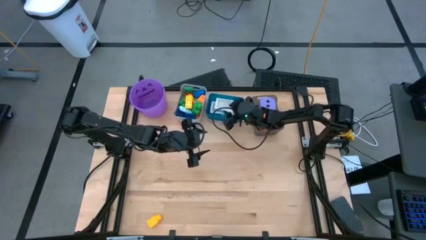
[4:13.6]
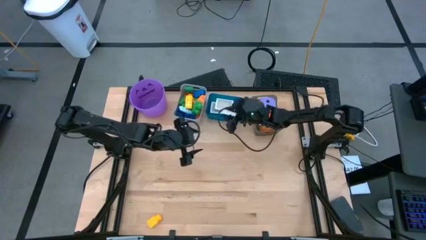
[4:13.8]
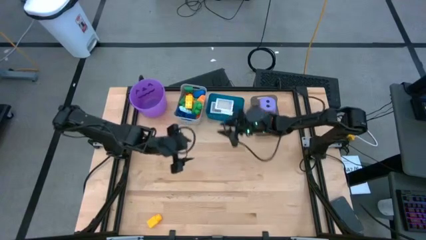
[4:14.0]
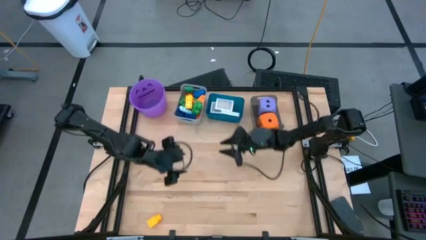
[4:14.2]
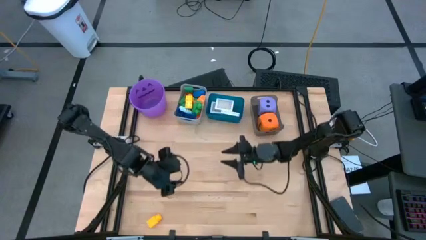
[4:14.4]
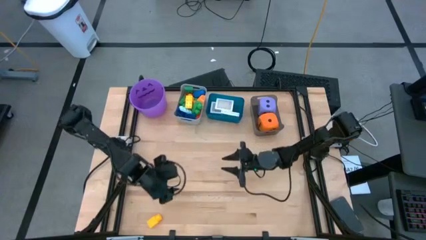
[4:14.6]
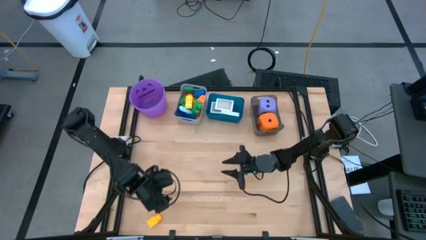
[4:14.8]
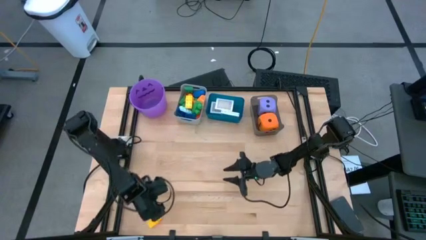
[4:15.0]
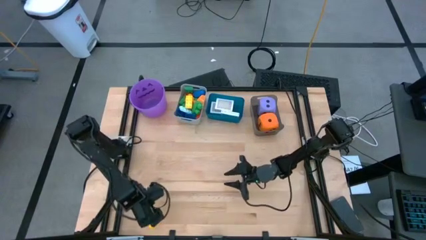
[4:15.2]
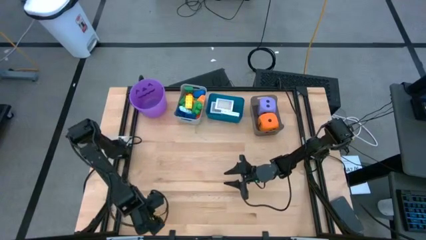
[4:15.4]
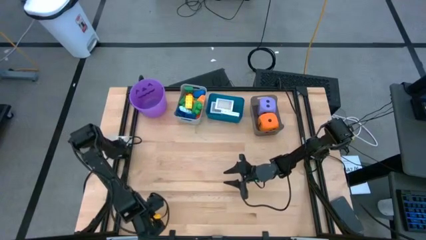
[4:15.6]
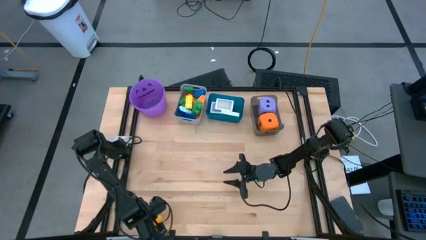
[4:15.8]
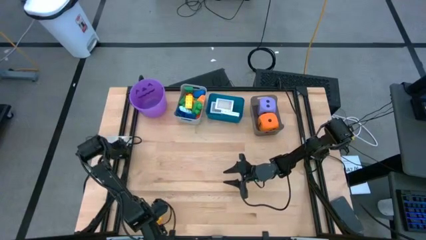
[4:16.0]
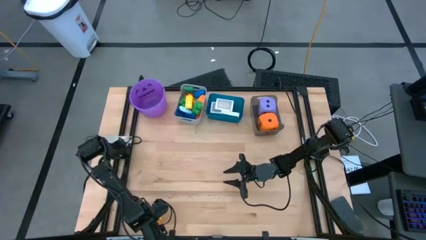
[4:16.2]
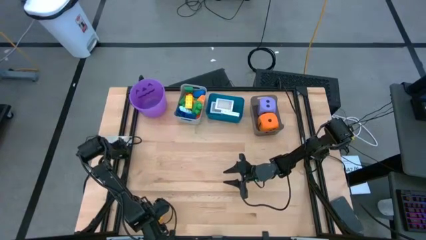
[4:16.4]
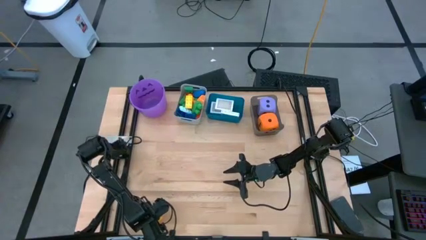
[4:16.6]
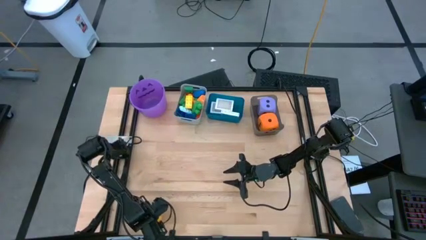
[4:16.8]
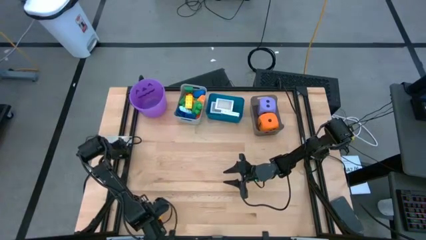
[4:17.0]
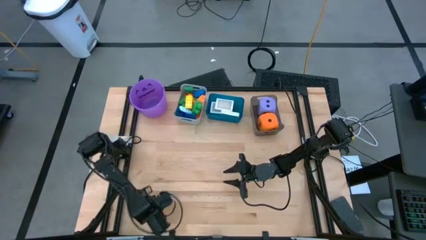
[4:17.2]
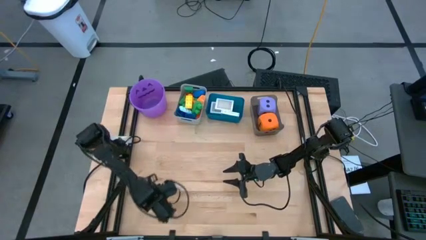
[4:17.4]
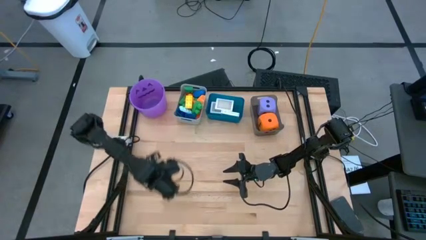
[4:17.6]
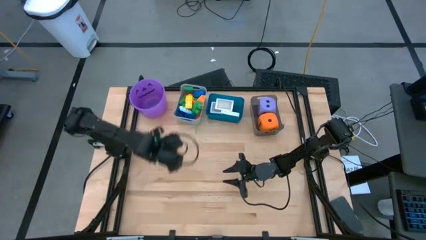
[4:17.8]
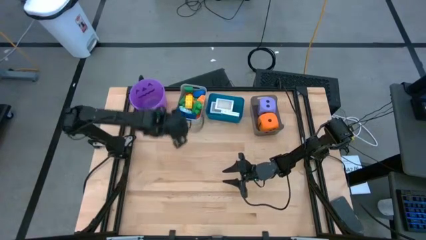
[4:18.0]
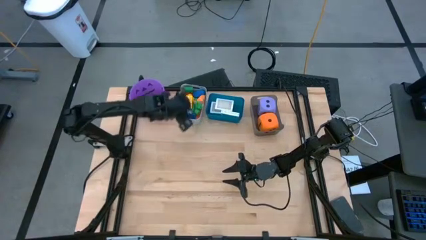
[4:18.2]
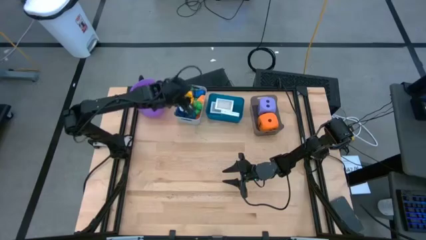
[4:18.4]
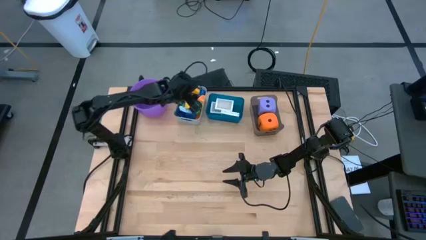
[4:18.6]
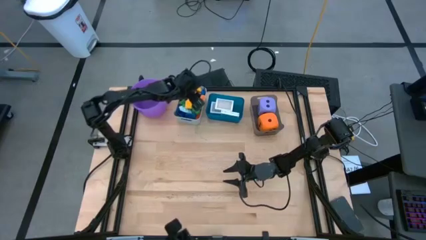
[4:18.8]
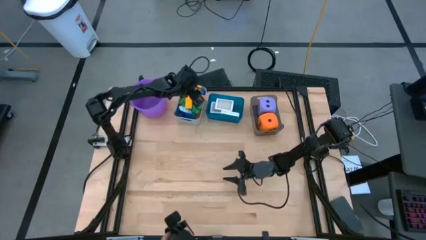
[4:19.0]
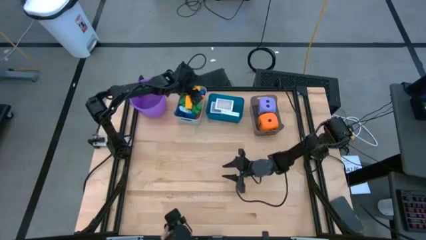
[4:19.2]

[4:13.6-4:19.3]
Task: Pick & Place Toys
Put the yellow game piece into the gray bin

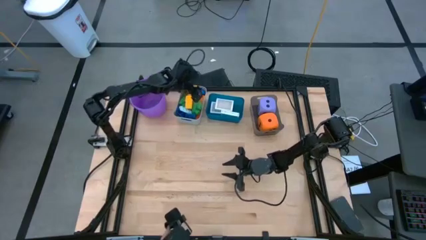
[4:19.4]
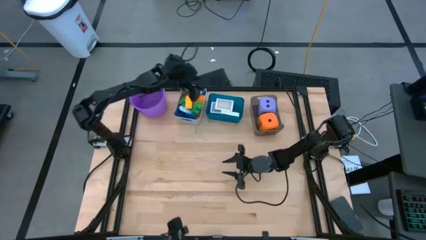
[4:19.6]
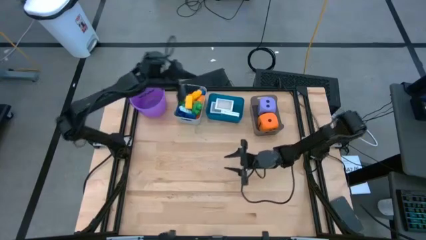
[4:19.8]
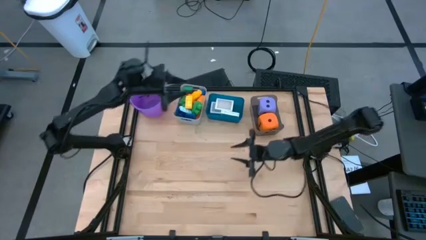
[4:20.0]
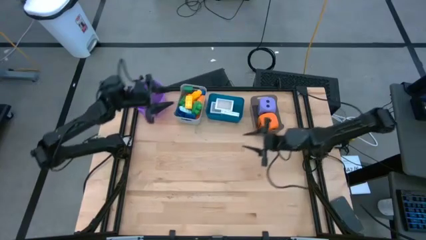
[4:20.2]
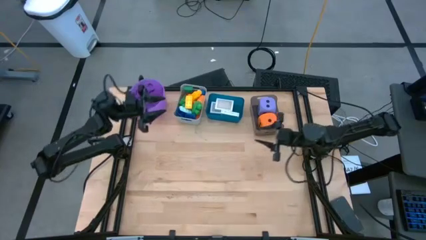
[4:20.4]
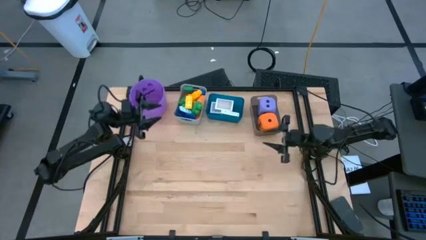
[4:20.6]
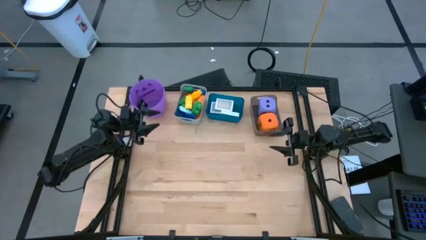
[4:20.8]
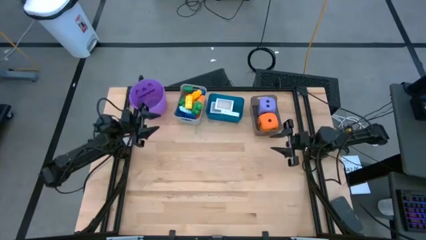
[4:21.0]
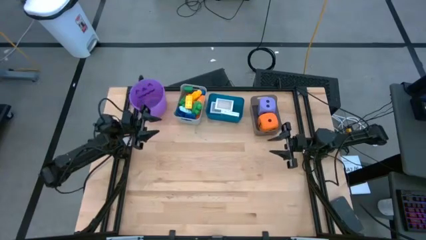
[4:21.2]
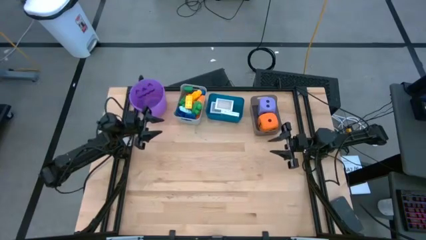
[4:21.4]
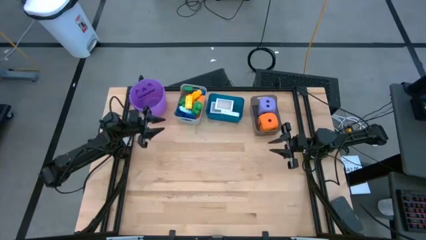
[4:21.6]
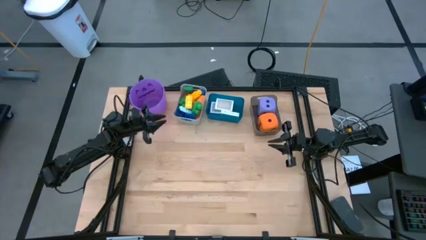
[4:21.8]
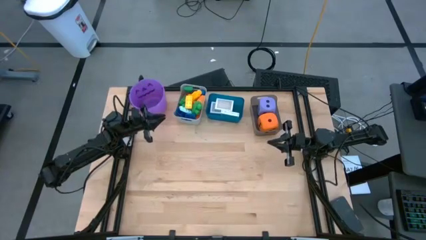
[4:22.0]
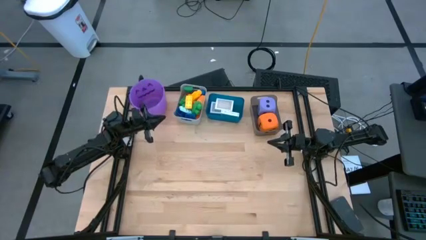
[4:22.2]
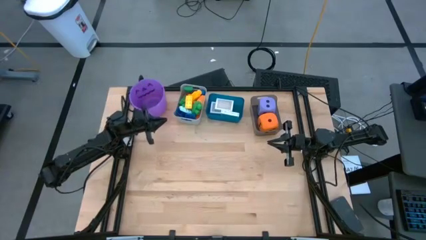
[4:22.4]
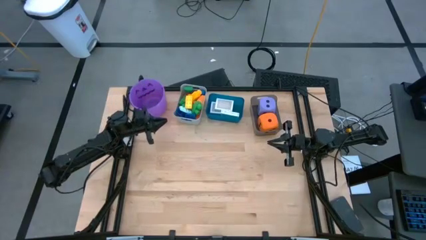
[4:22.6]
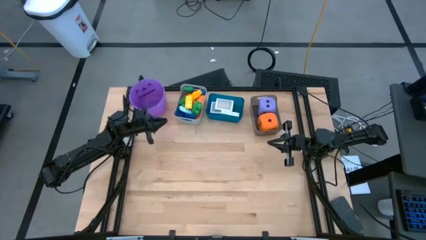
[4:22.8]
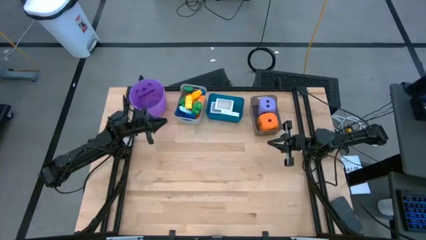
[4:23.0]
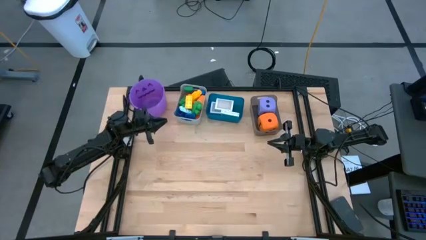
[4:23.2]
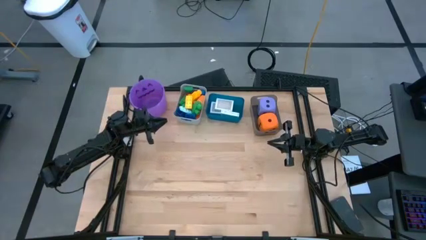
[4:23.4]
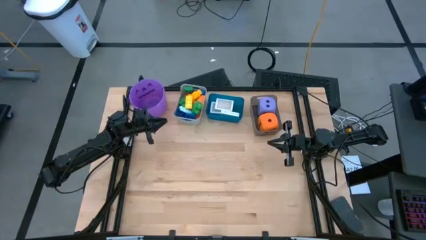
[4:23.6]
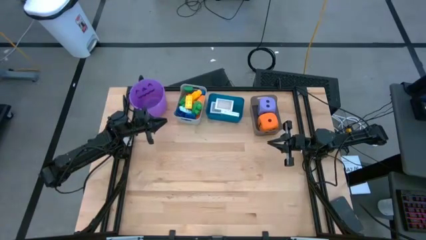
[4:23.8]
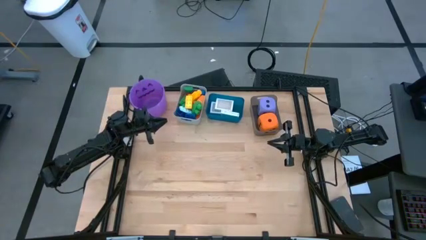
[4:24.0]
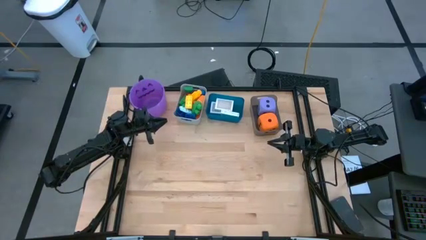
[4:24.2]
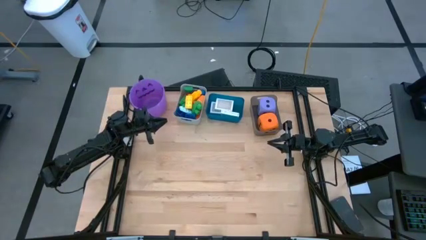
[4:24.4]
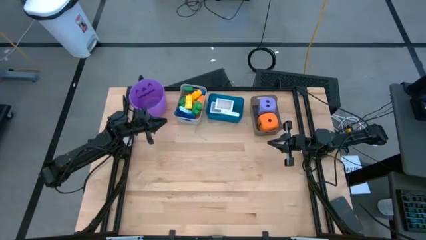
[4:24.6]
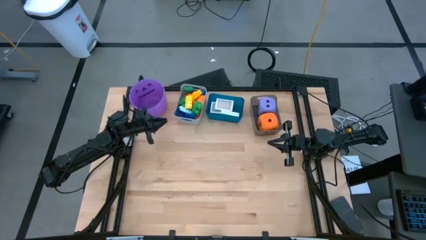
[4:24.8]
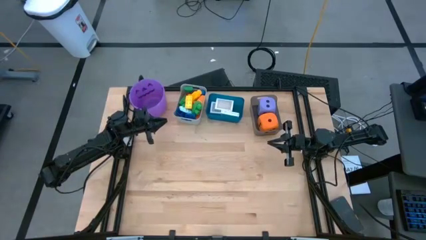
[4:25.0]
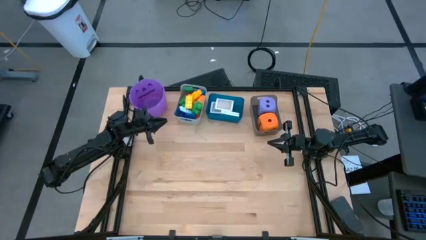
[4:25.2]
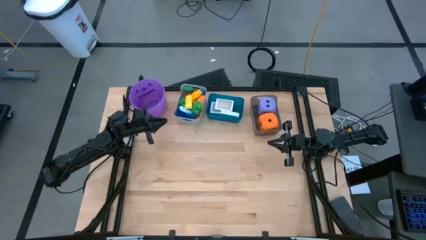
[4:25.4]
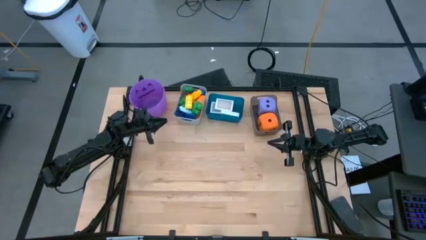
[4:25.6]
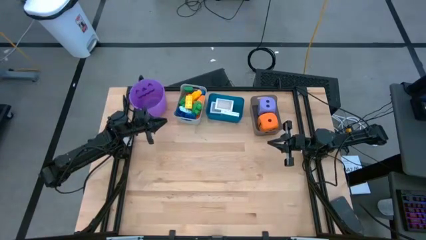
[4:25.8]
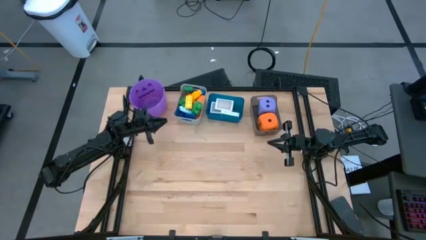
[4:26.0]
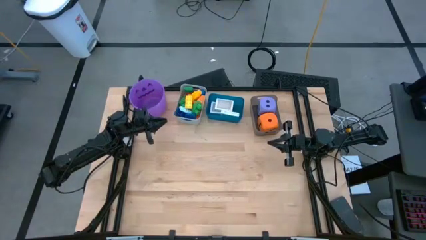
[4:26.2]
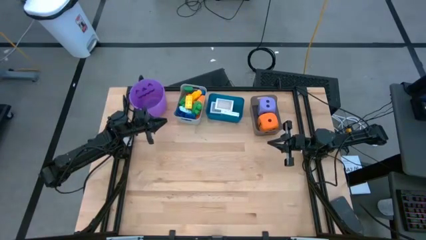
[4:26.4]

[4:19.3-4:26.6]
Return to home position

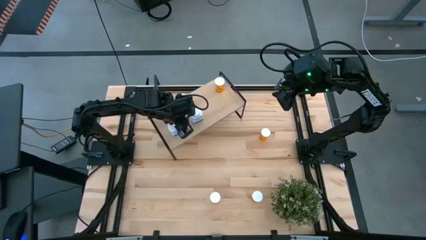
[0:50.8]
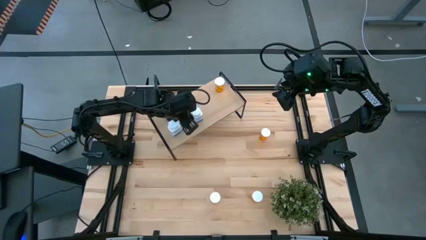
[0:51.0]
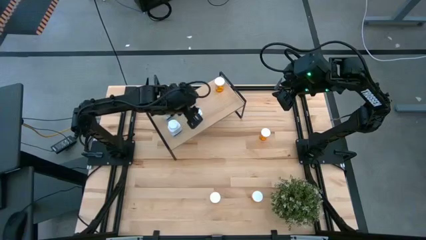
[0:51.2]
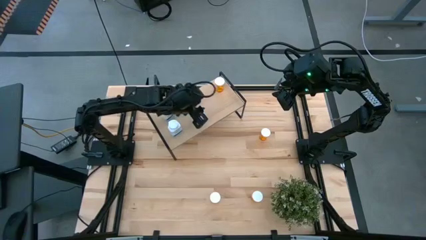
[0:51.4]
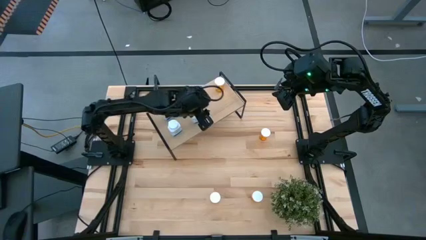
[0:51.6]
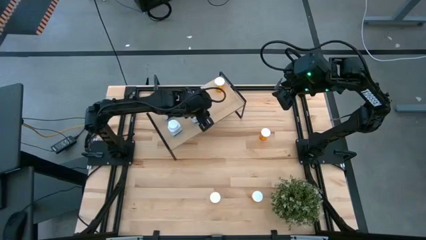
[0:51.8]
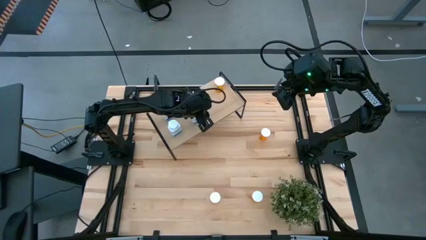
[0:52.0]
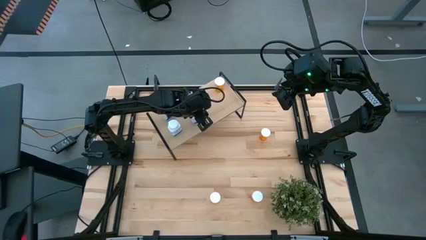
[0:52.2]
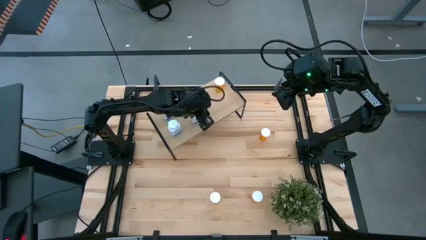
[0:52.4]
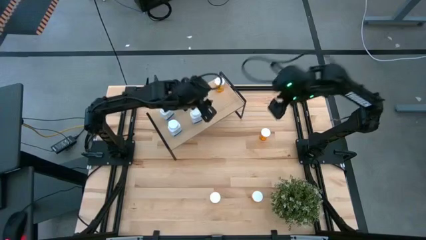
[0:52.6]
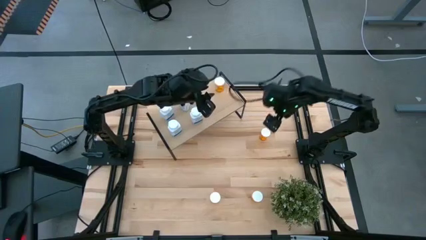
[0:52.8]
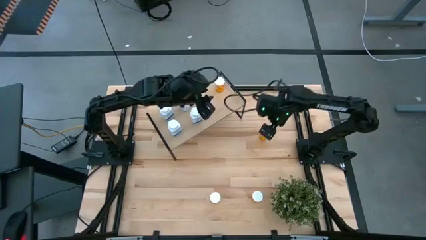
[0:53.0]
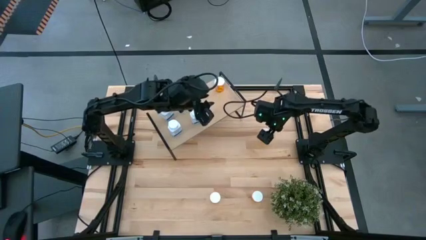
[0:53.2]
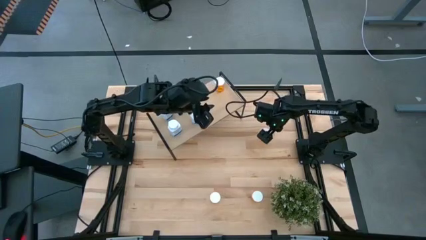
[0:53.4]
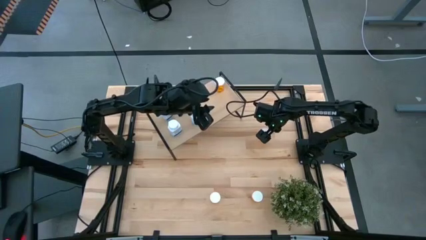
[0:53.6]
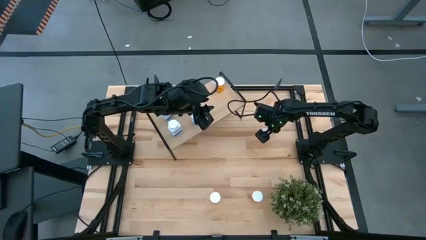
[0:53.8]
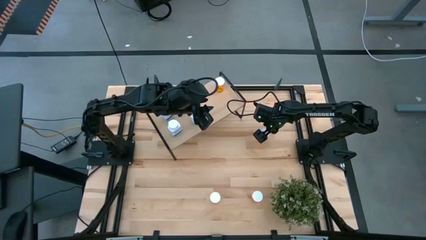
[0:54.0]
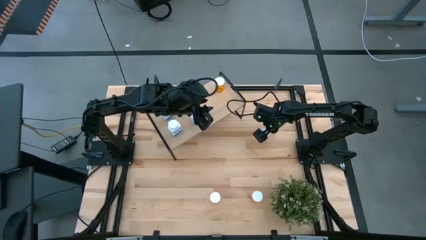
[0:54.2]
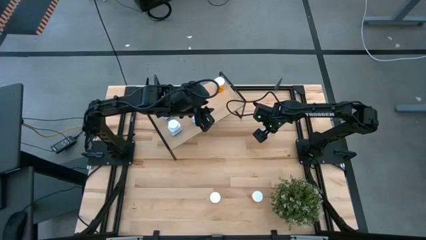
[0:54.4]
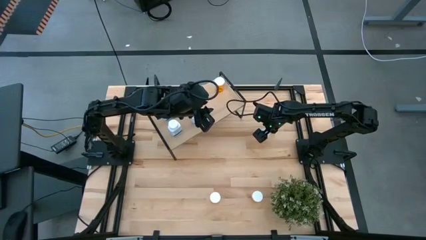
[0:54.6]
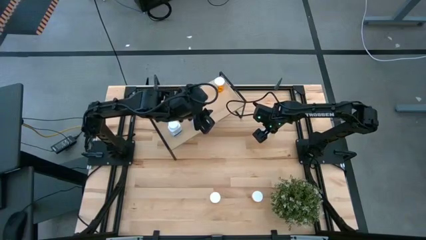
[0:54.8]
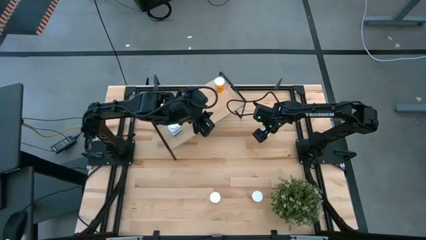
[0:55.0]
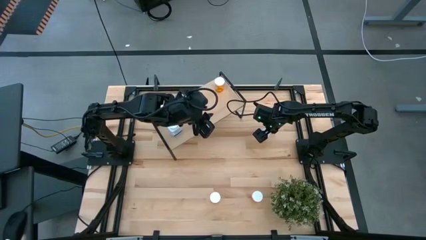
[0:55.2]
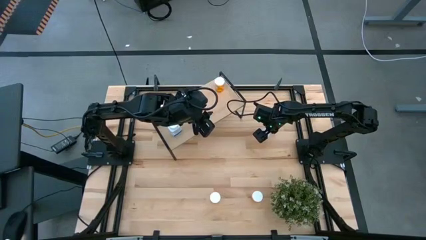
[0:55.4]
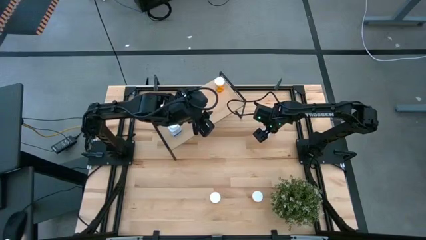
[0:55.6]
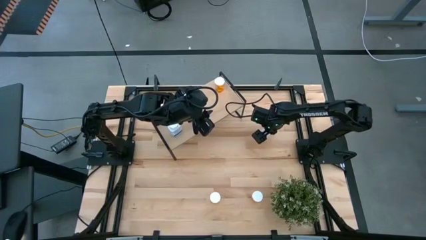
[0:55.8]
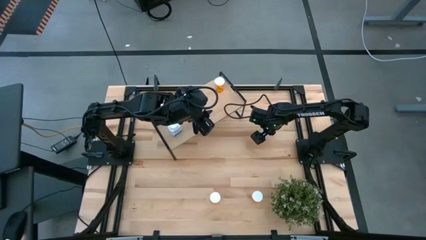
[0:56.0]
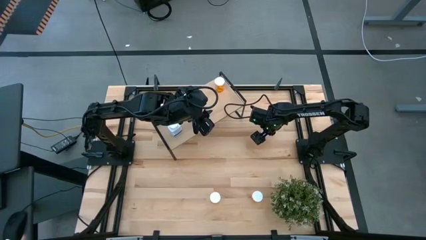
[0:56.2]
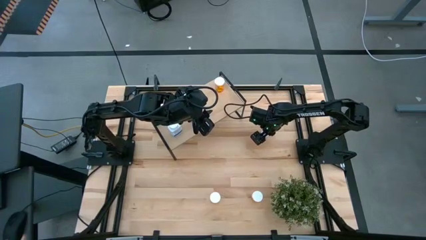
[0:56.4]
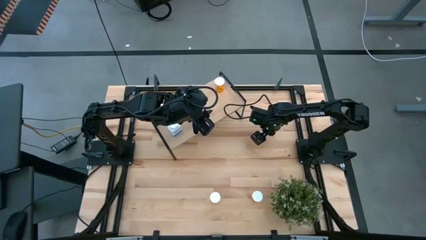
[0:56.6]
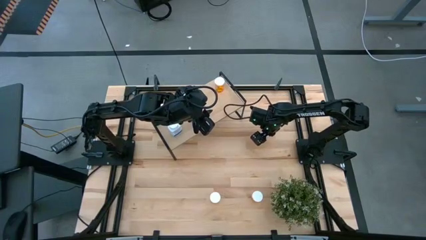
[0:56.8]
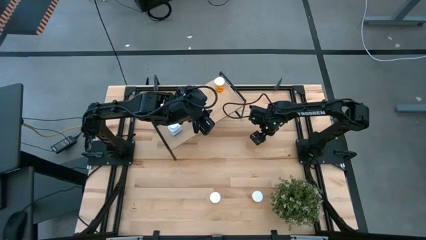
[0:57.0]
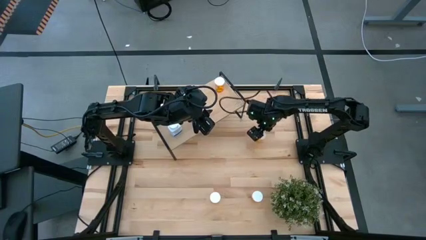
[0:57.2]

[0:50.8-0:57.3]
Task: Pick and place medicine bottles onto shelf by color
Put the orange pill bottle on the shelf aligned with the other orange pill bottle
